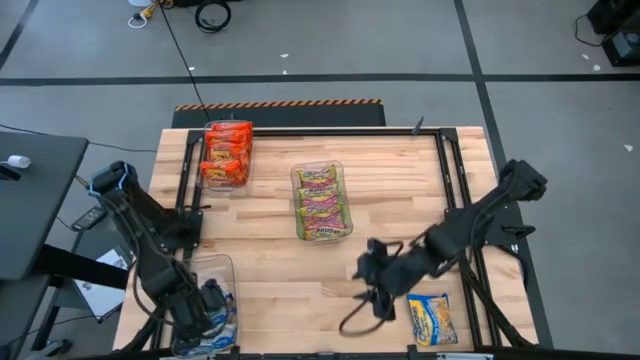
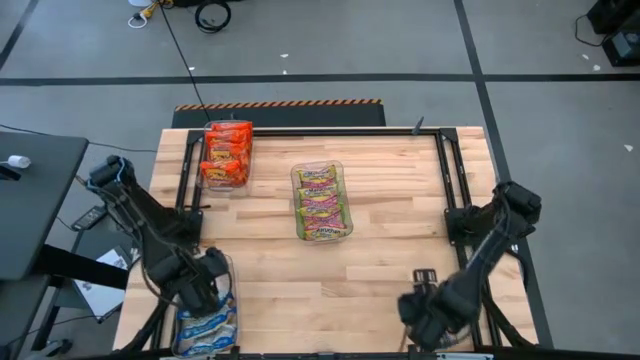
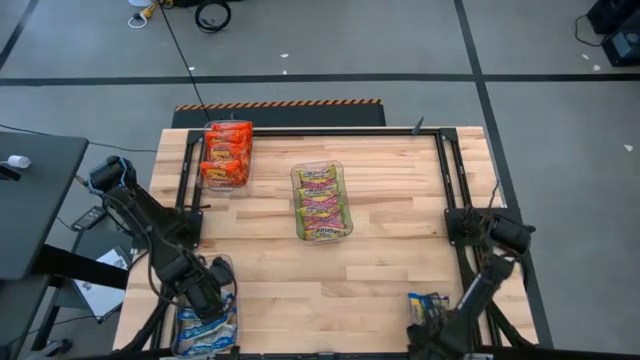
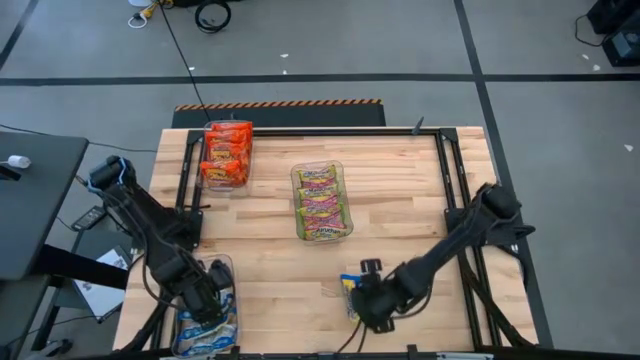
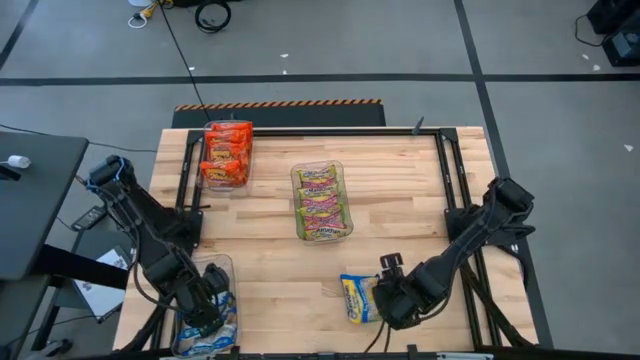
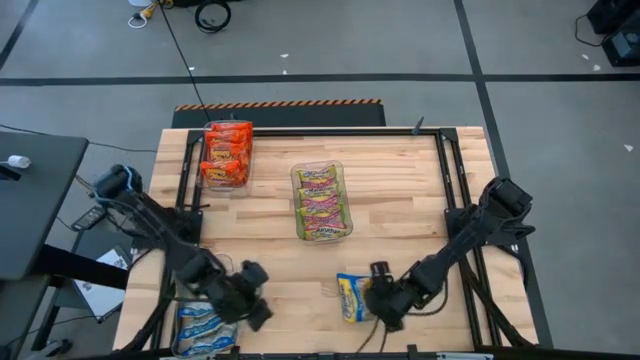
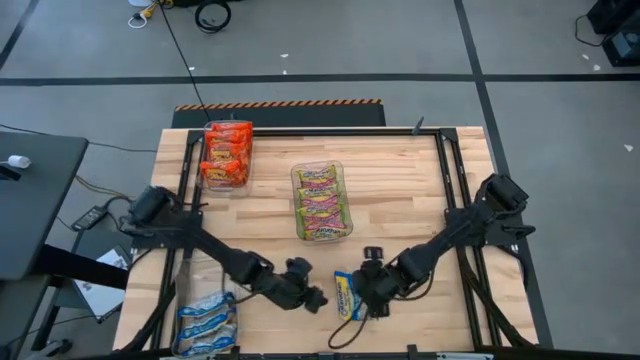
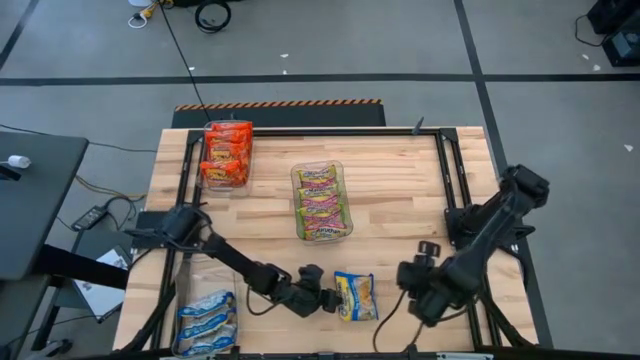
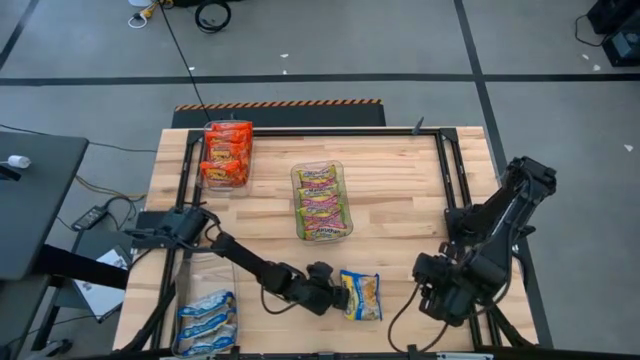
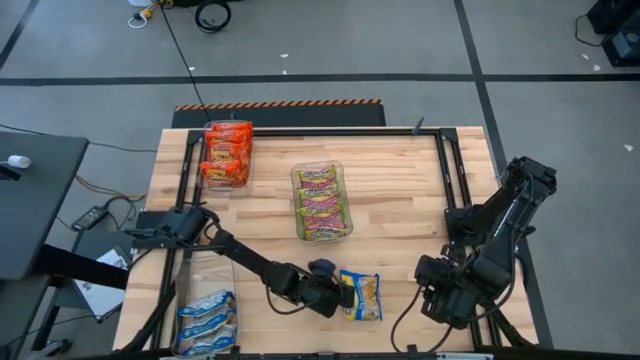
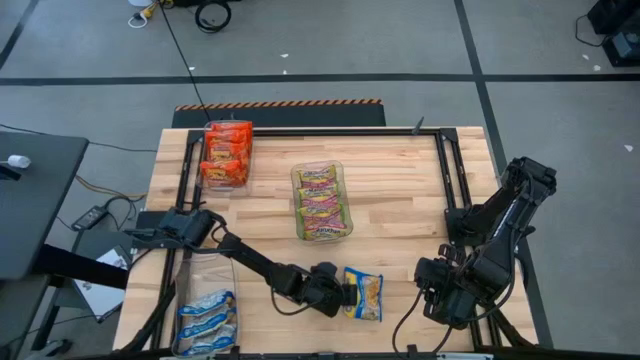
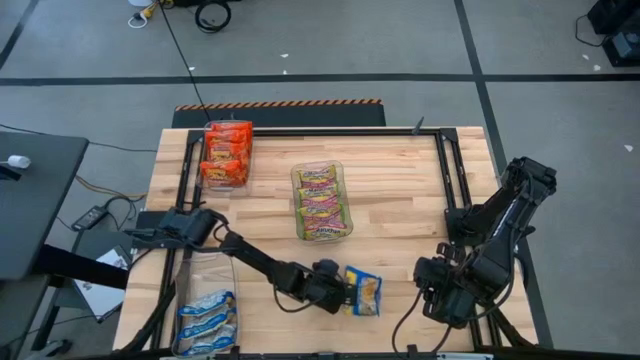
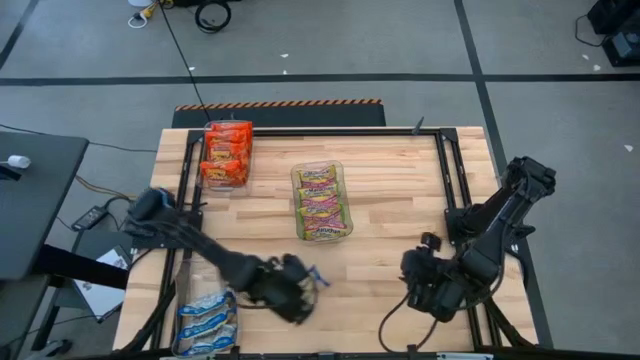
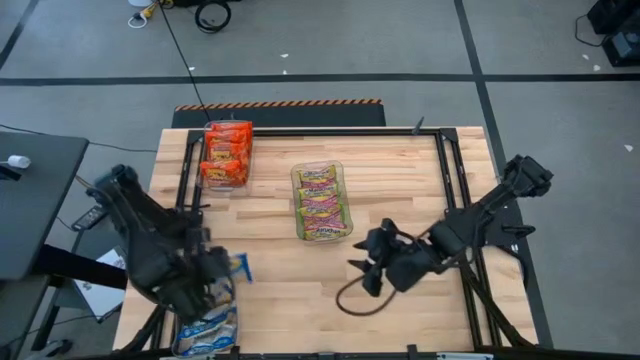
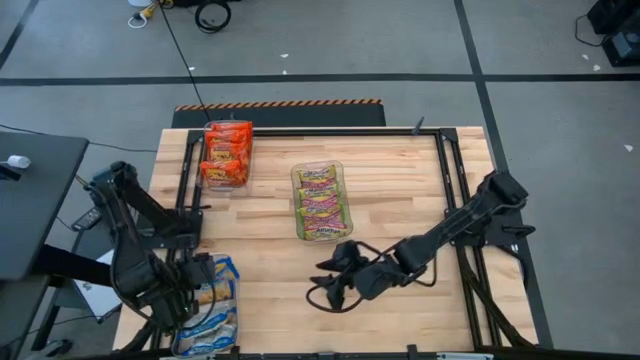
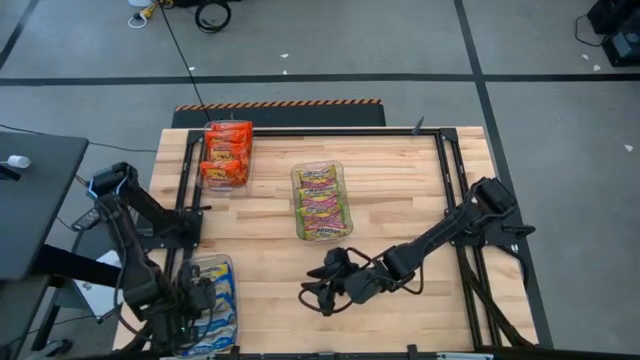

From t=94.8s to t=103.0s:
Task: Sort Maruchan noodles
Put the blue noodle pack into the bottom transparent bin

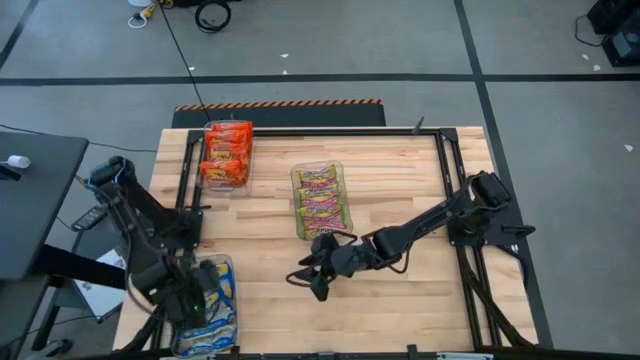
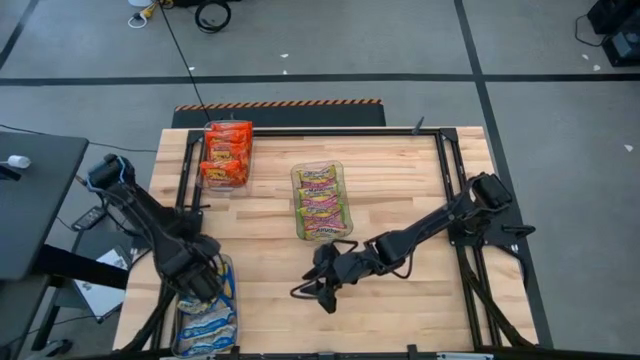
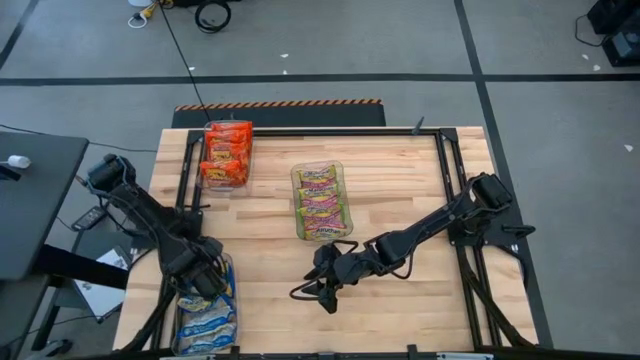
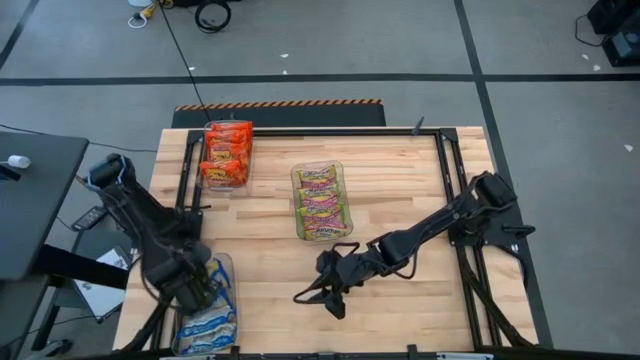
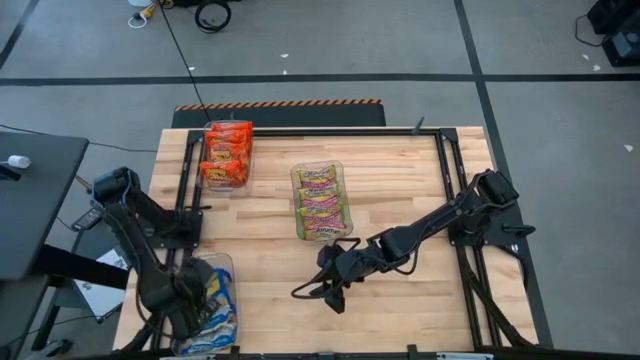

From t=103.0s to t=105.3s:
Adjust the blue noodle pack

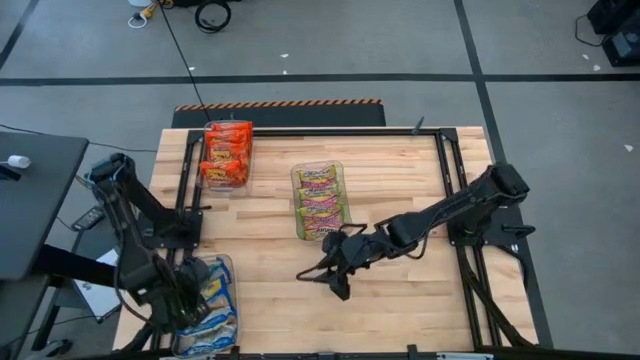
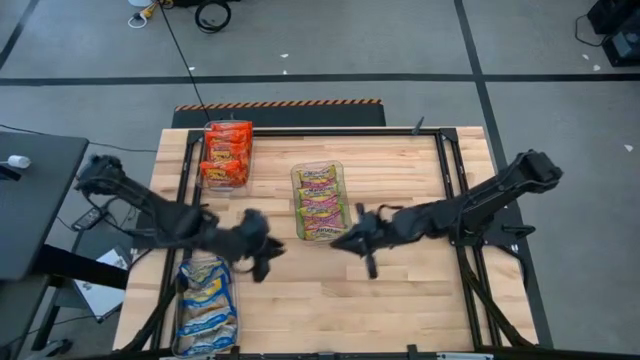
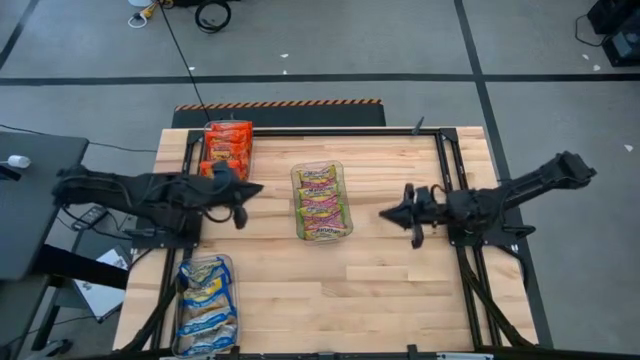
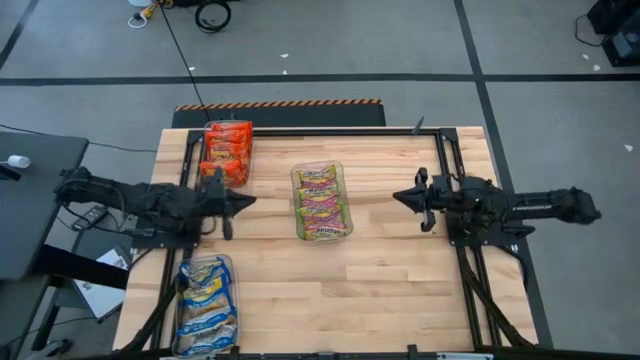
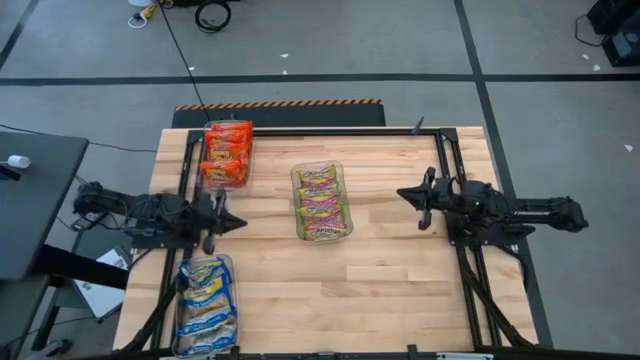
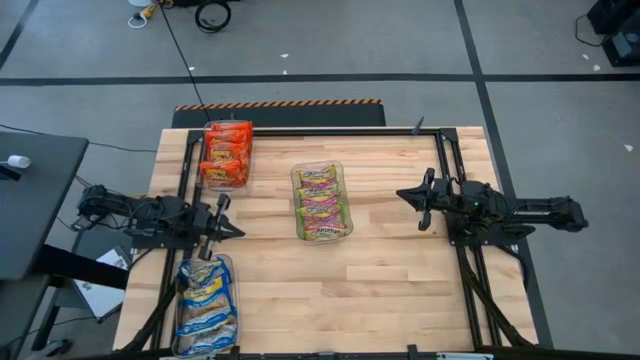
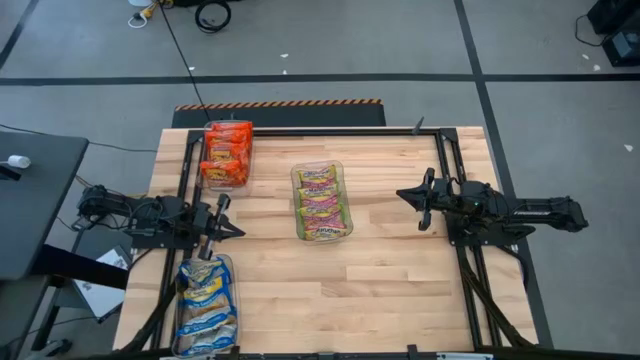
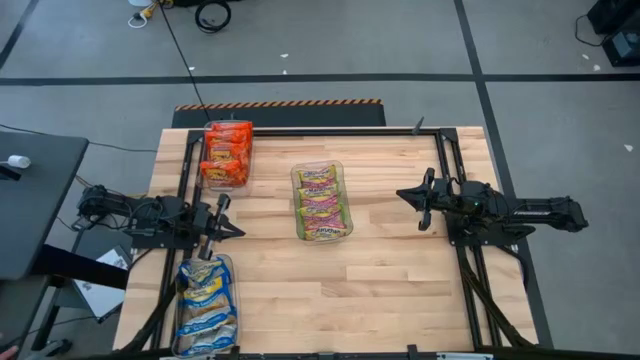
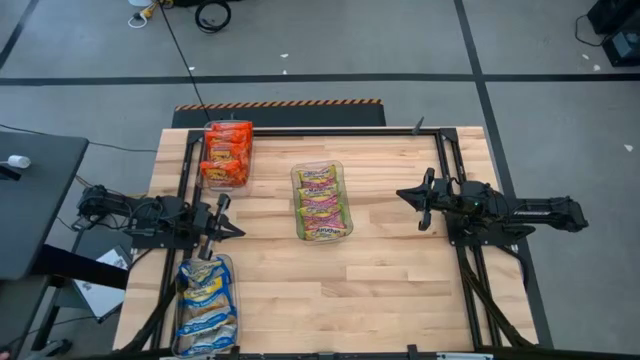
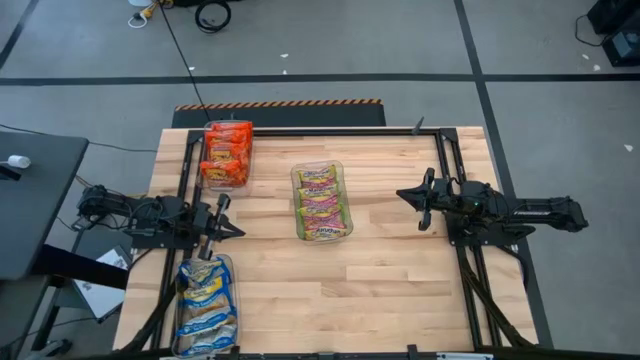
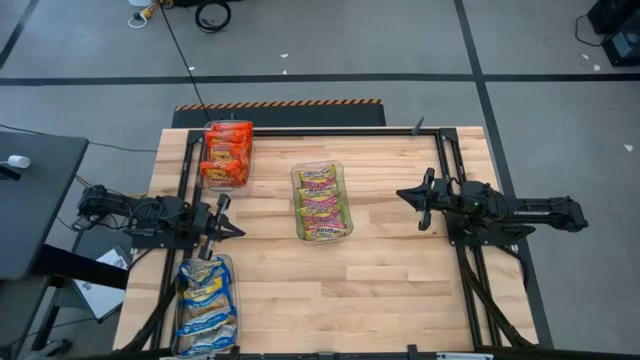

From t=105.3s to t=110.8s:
Return to Home Position

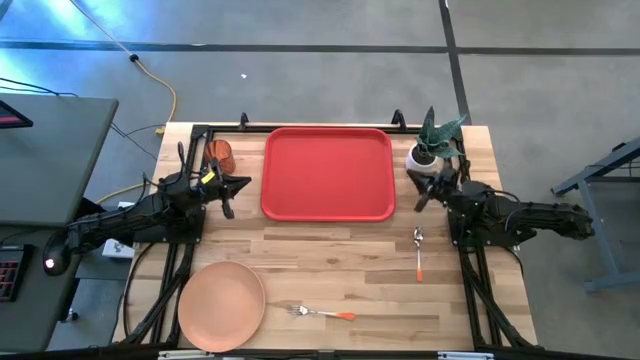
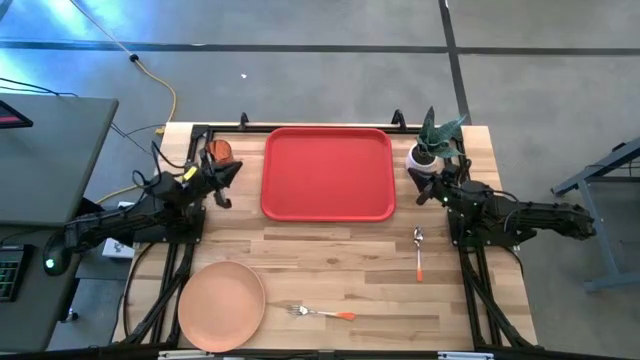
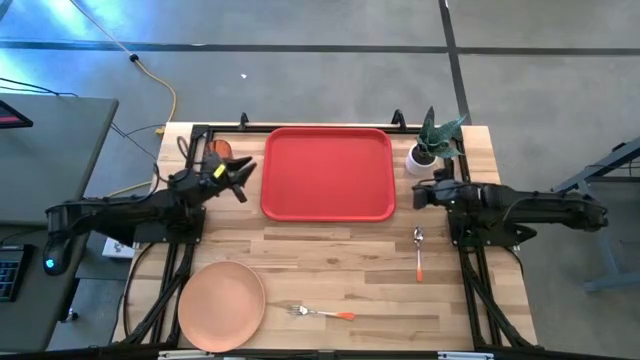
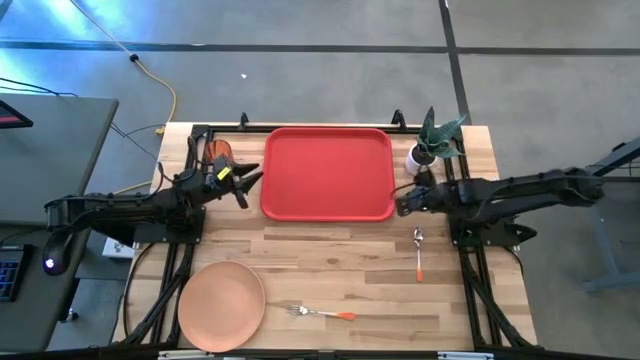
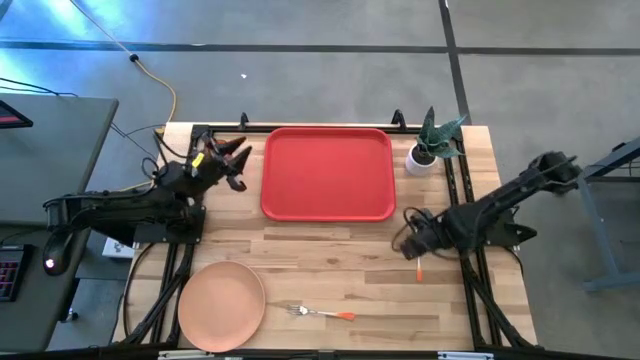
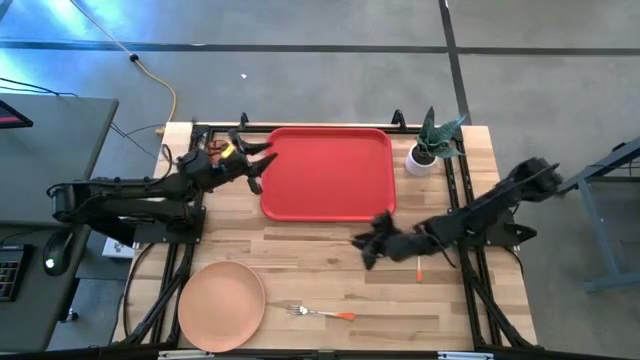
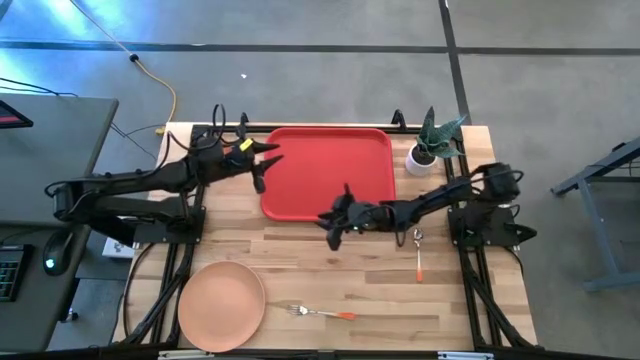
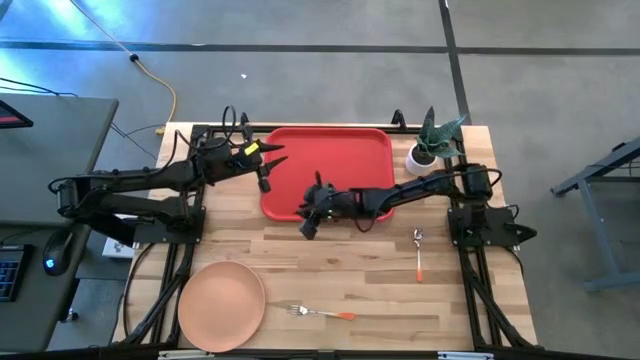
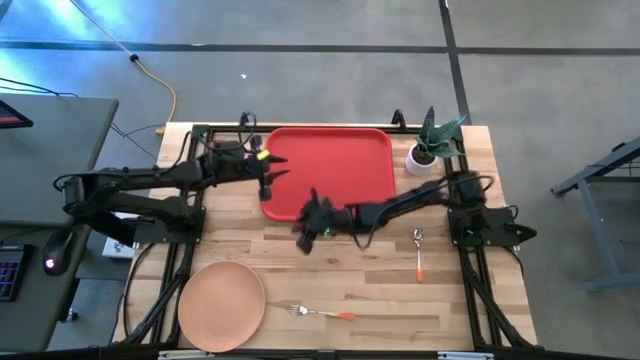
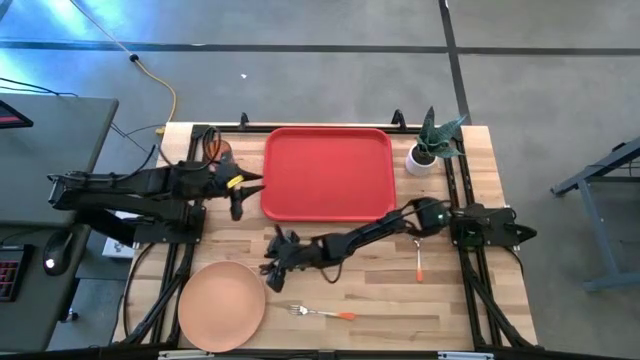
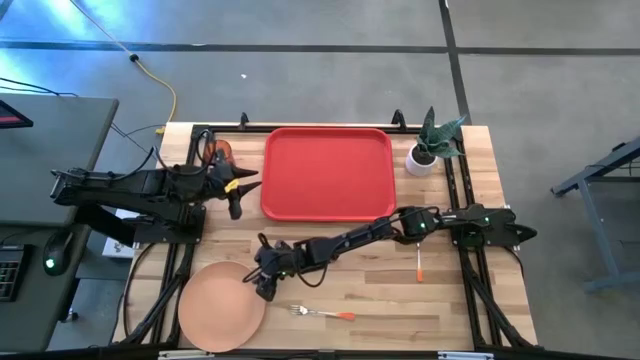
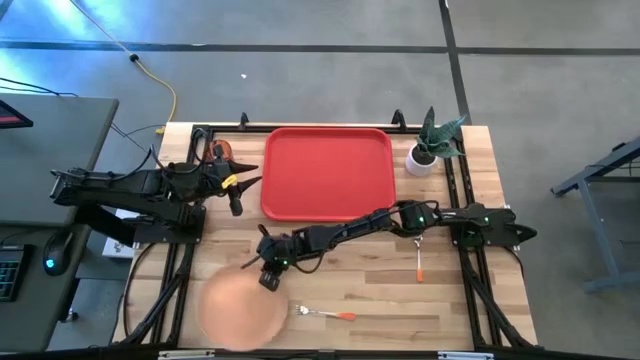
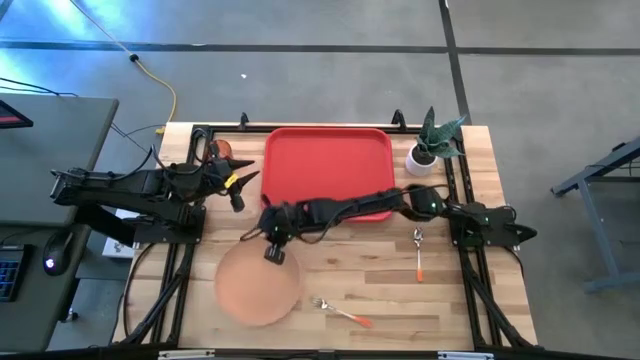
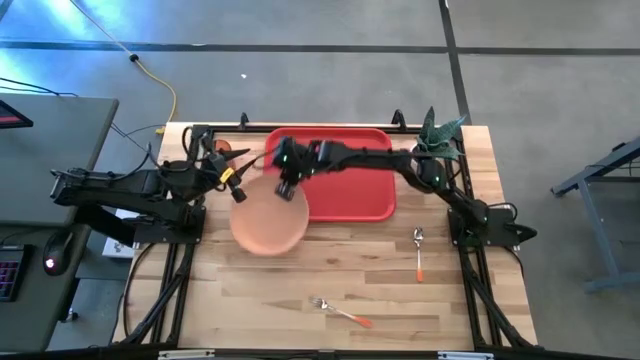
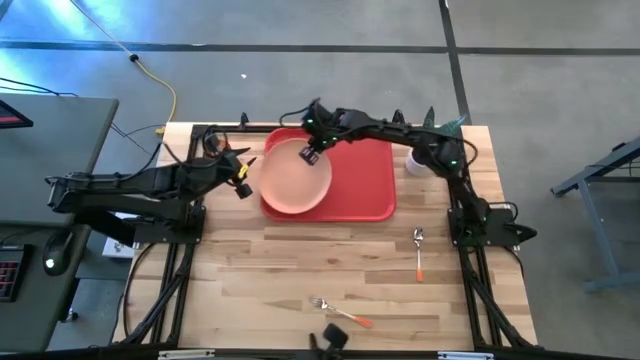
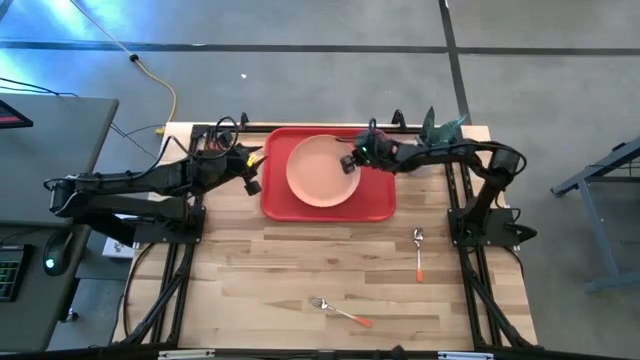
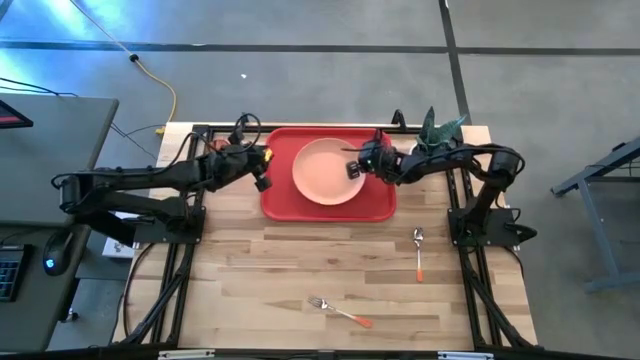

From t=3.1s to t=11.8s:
Task: Pick and place plate/cup/fork/spoon on tray
Put the light orange plate on the red tray
